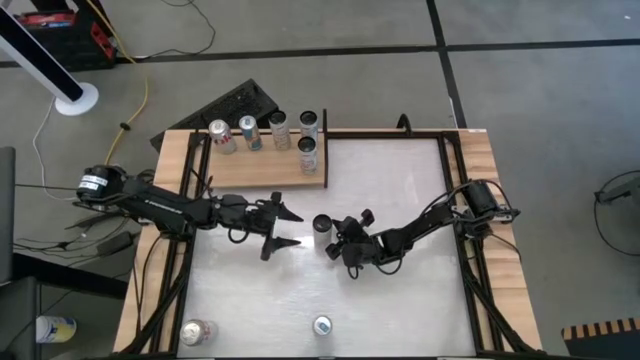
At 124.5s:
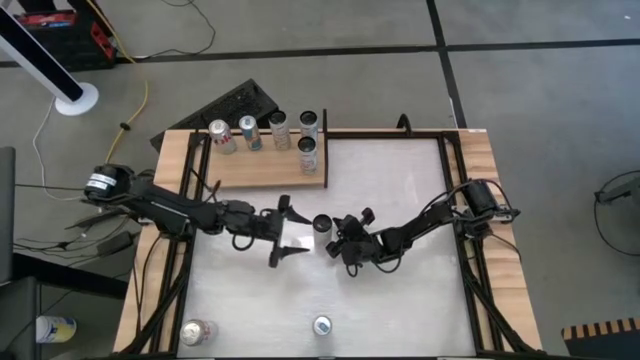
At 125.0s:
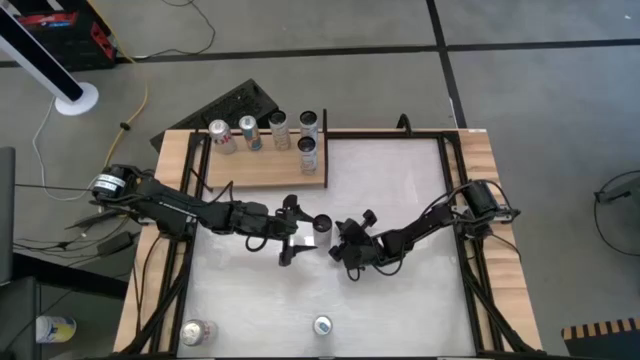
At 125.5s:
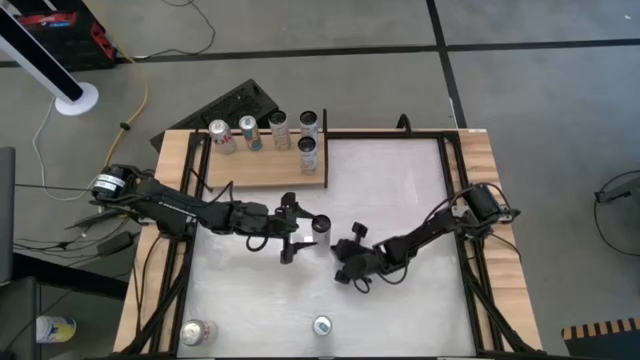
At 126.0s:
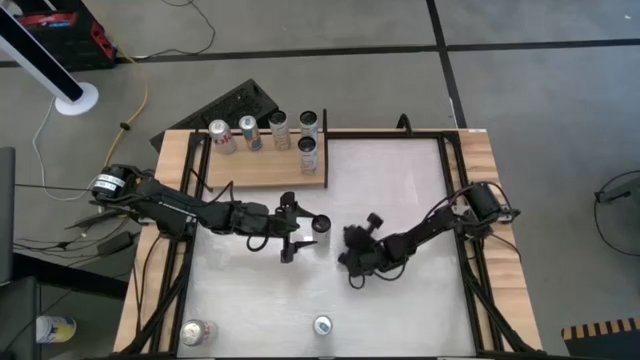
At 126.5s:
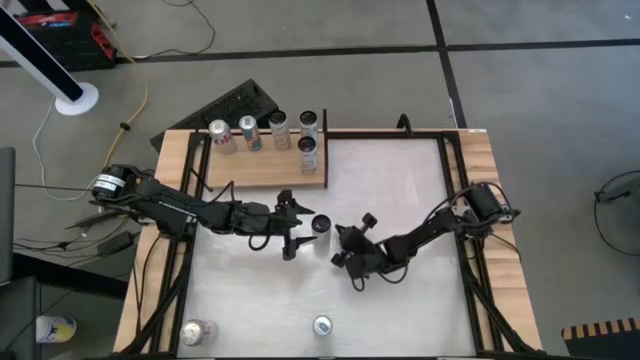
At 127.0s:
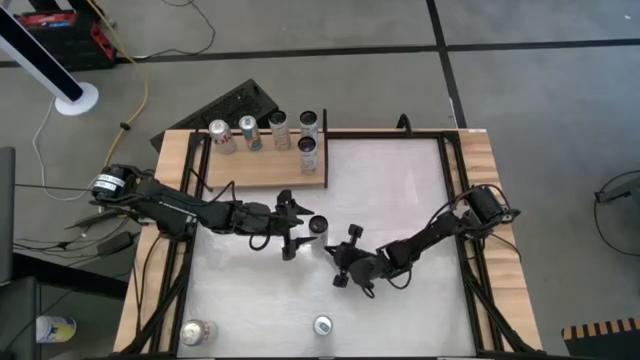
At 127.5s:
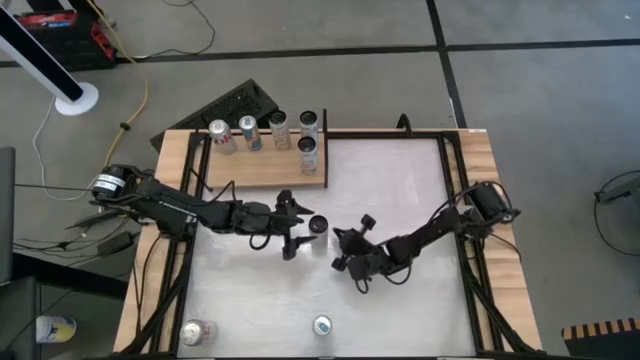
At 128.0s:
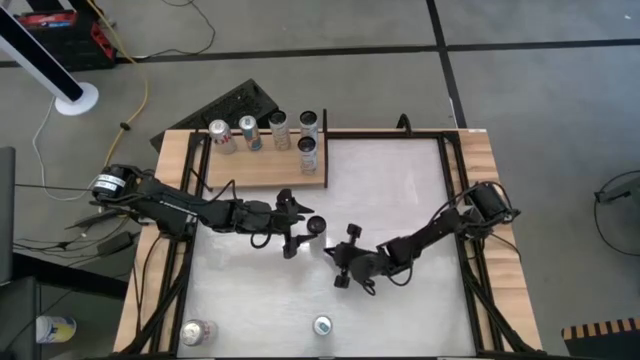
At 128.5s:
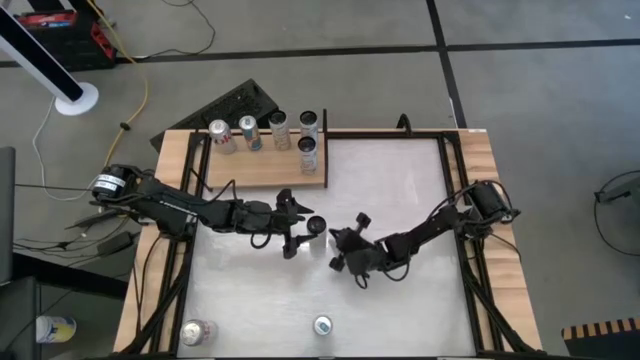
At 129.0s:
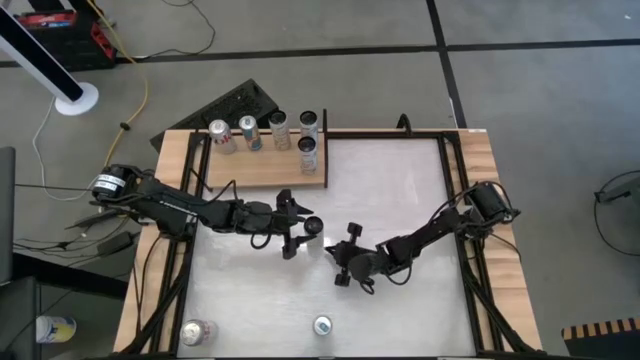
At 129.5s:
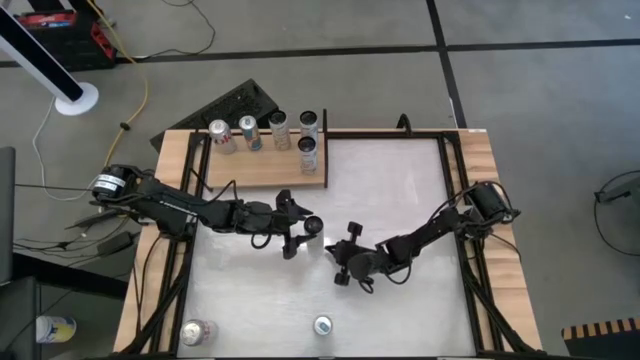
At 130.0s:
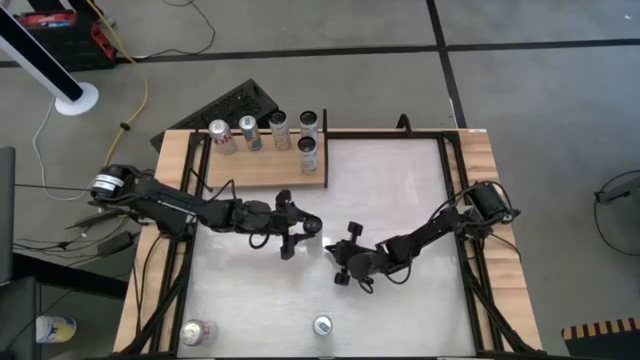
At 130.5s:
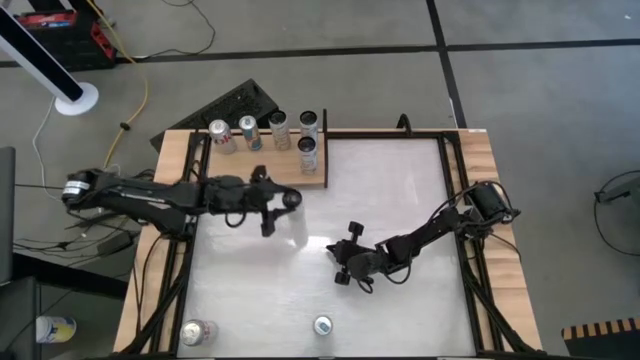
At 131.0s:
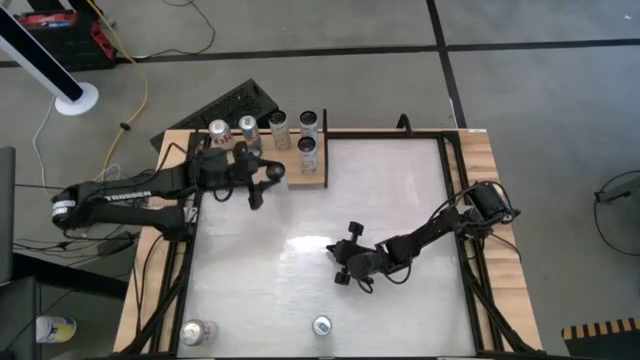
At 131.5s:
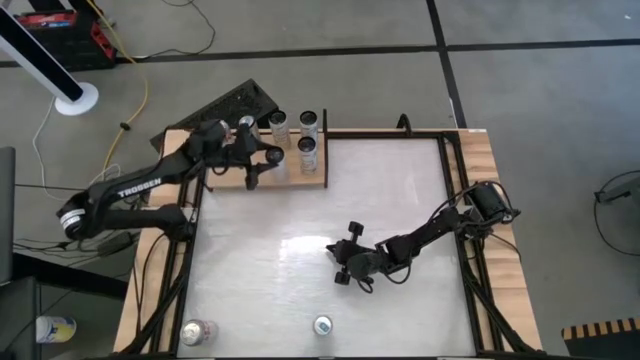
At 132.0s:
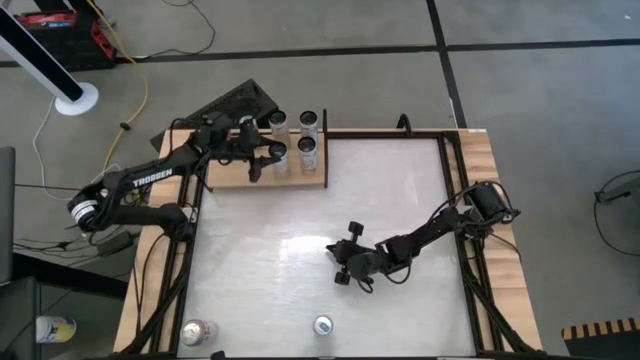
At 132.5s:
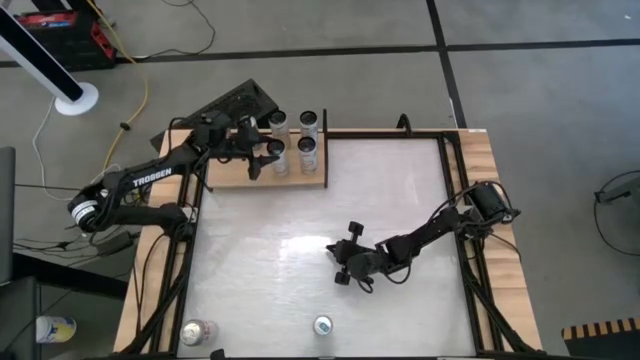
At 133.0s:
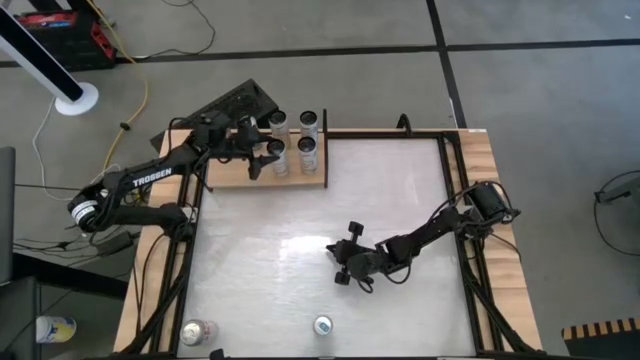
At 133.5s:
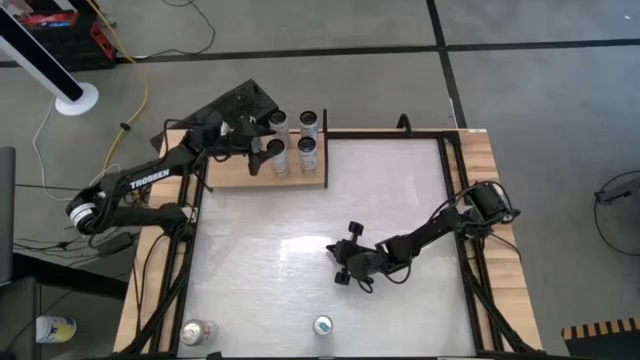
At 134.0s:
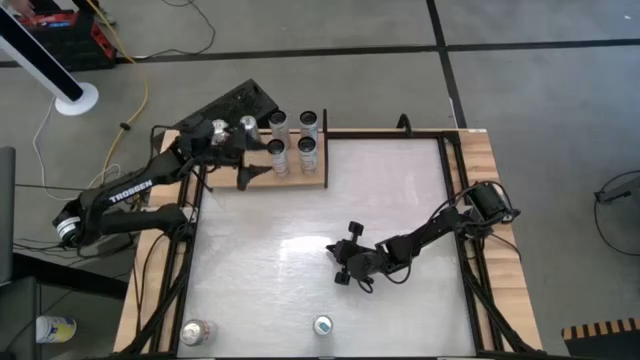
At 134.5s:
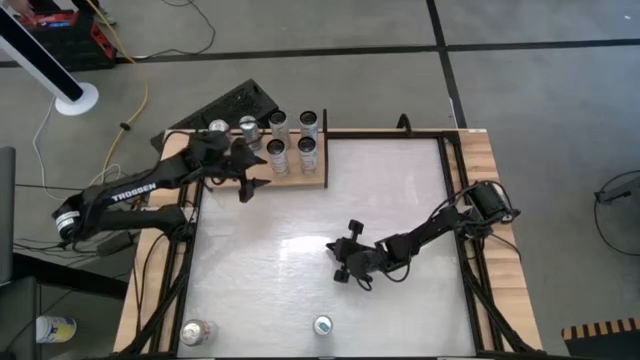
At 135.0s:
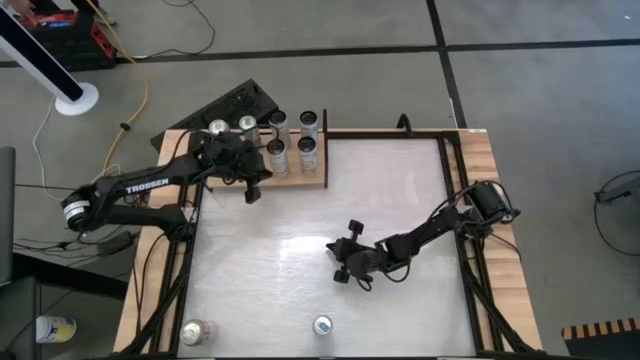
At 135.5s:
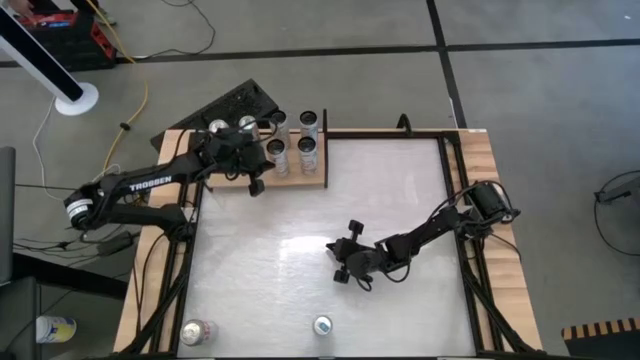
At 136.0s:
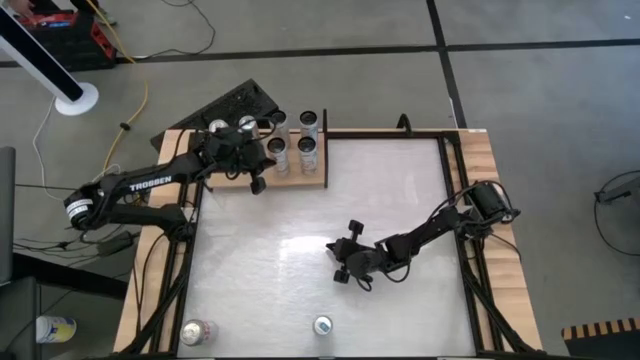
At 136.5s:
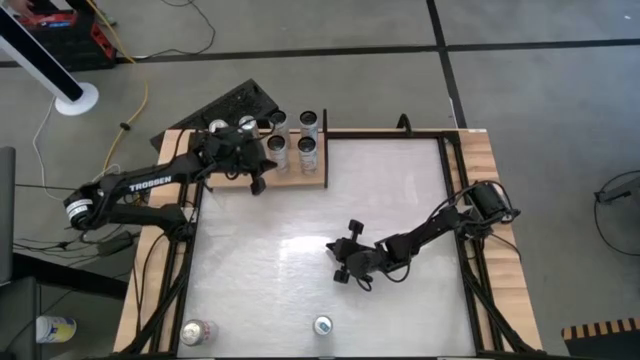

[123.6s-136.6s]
Task: Place canned beverage on shelf
Put the tropical vibe celsius soda can aligned with the other tropical vibe celsius soda can on the shelf

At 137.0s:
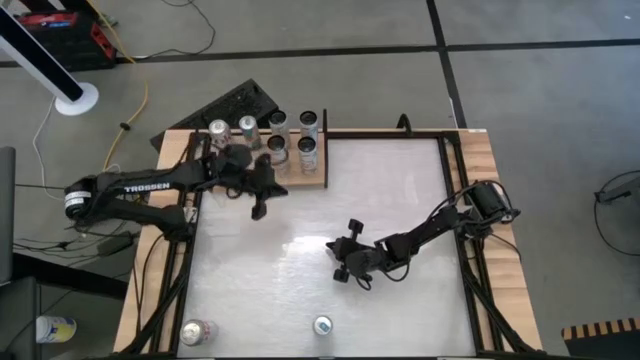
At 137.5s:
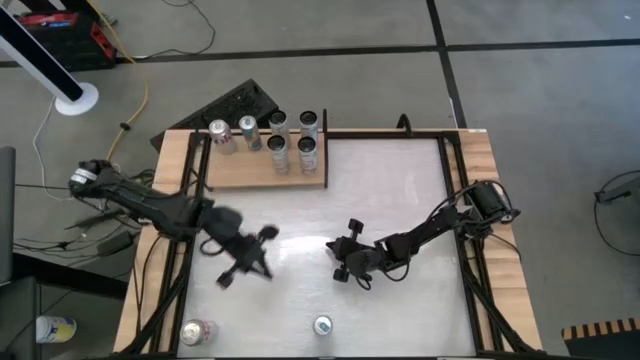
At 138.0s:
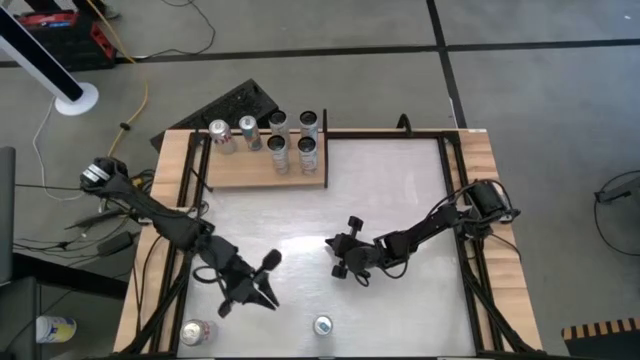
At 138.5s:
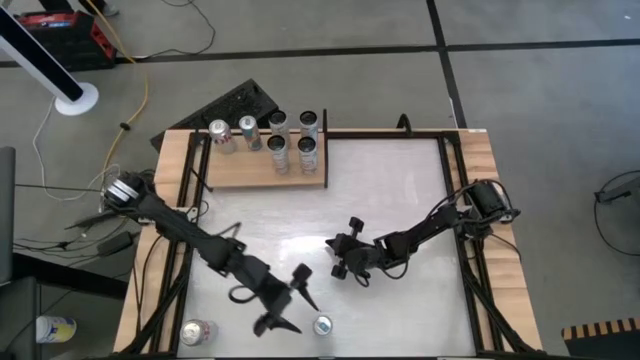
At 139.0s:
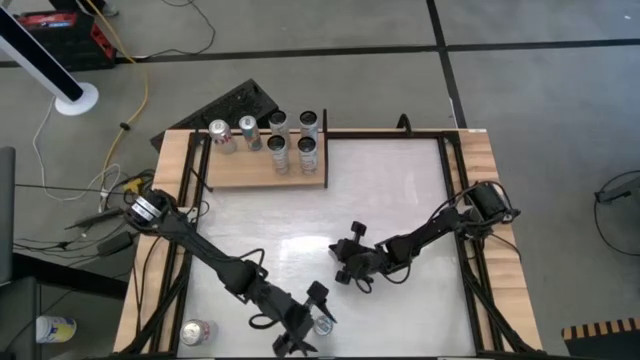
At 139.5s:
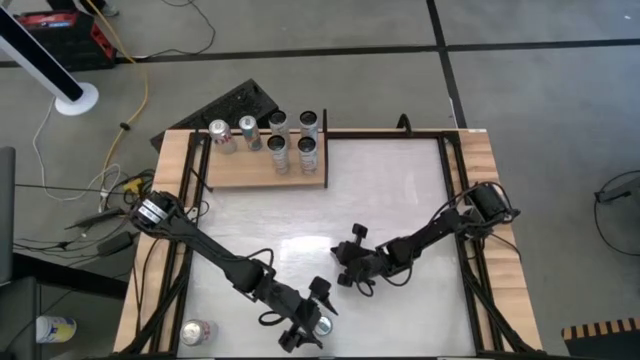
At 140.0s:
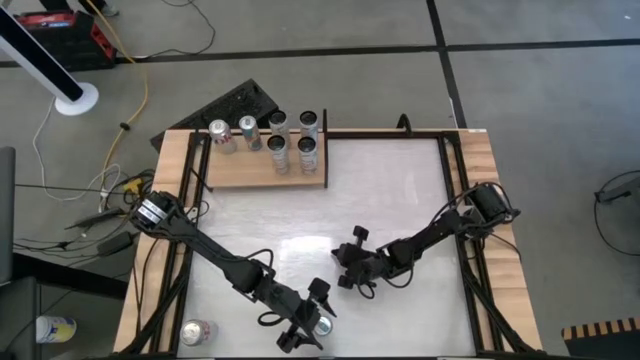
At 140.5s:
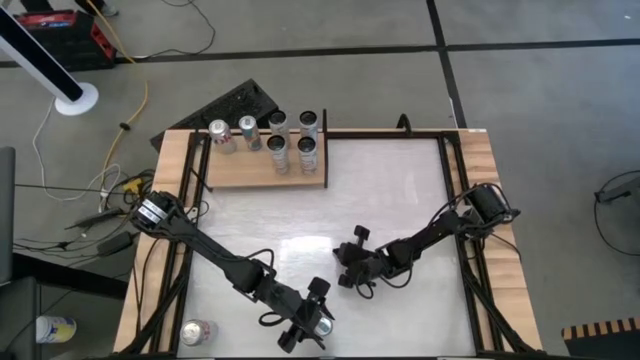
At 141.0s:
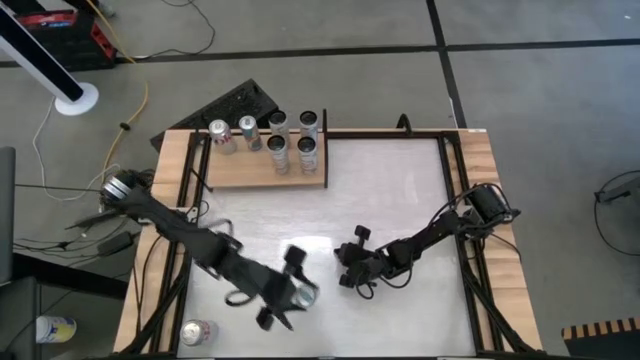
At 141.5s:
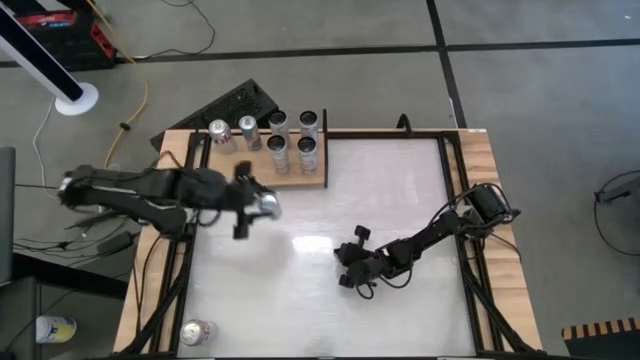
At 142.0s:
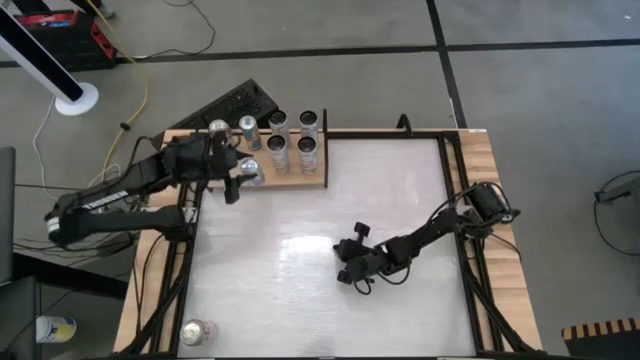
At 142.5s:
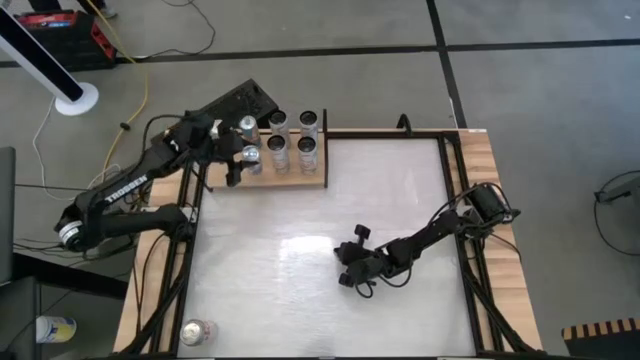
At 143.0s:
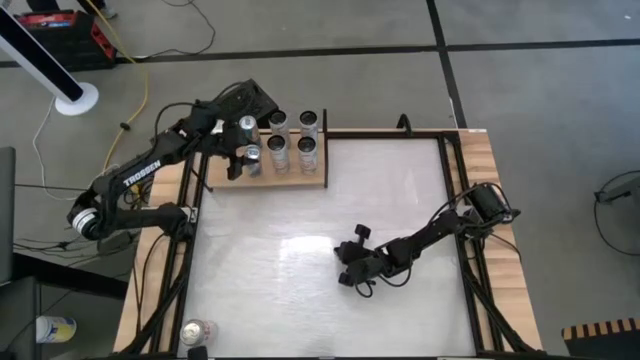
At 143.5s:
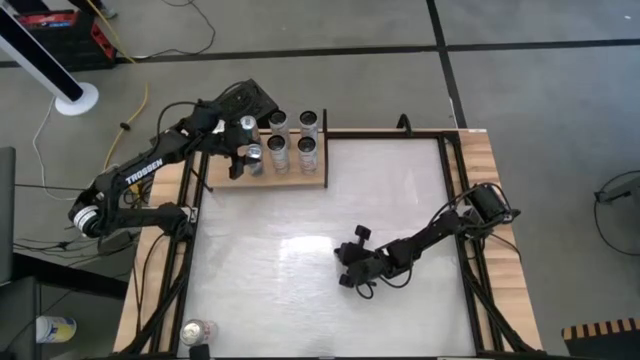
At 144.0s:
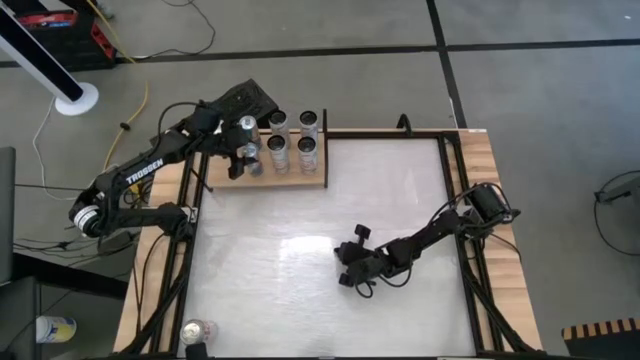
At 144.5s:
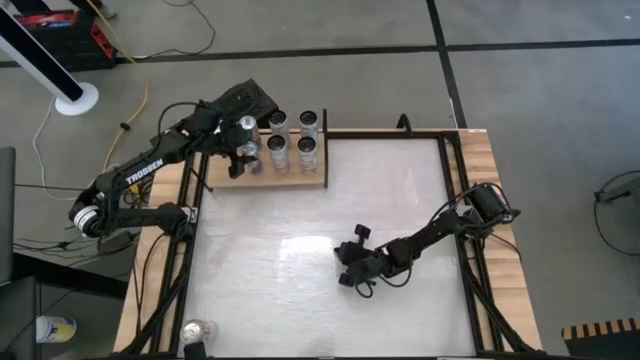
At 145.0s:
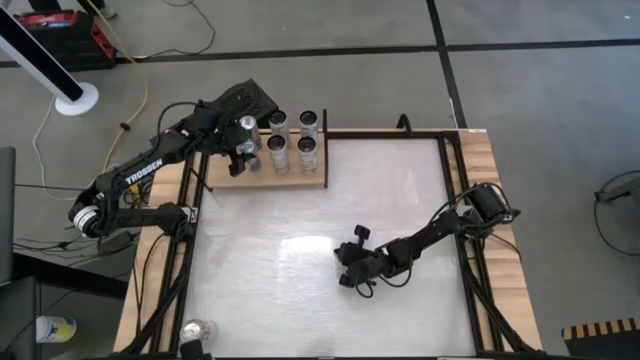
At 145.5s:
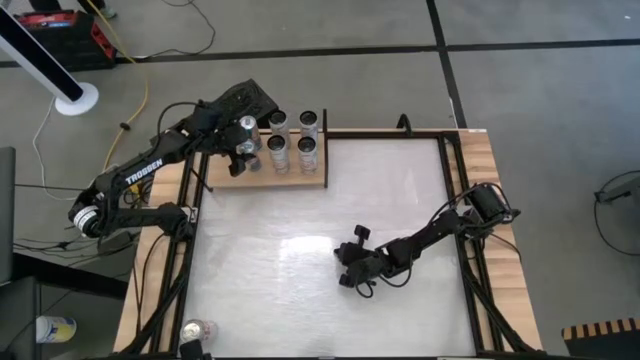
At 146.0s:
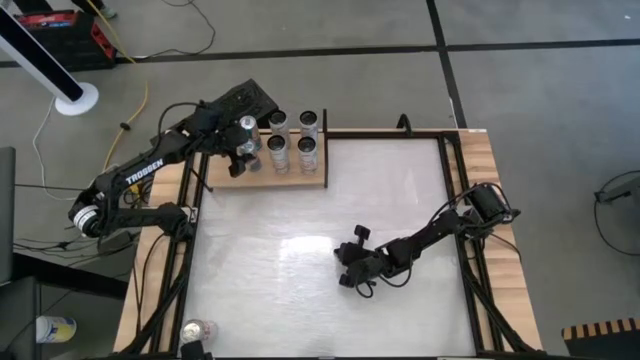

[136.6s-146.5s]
Put the red bull soda can aligned with the other red bull soda can on the shelf
